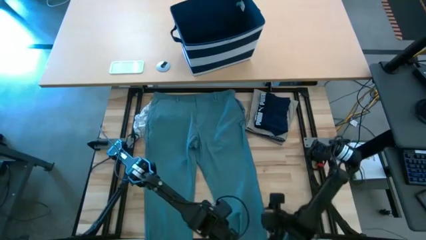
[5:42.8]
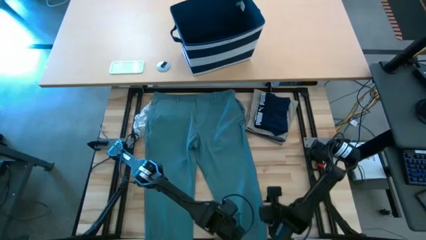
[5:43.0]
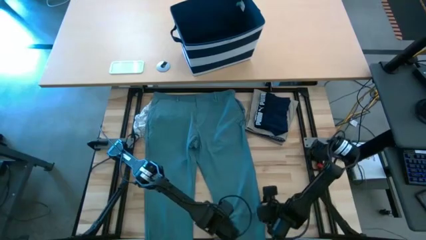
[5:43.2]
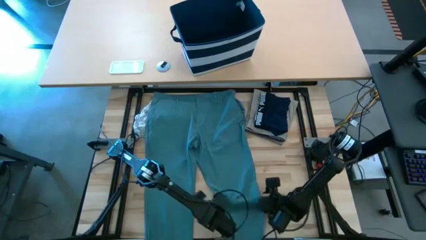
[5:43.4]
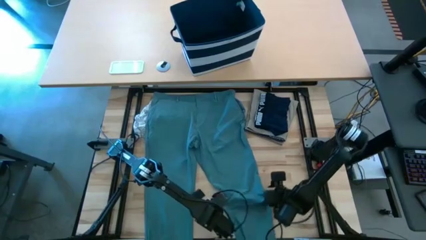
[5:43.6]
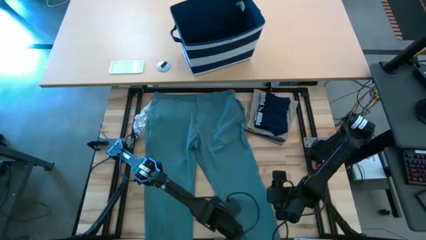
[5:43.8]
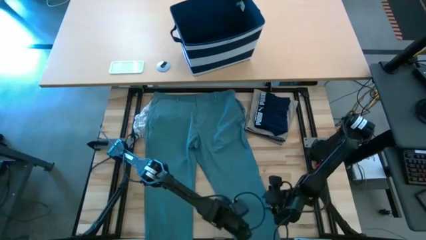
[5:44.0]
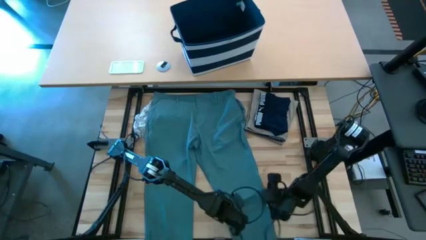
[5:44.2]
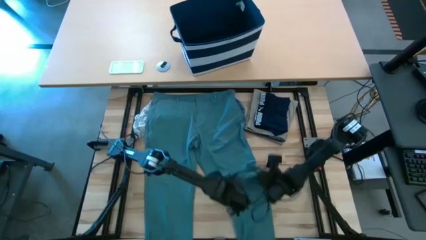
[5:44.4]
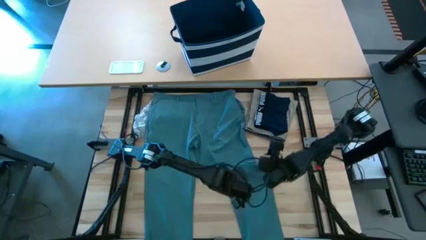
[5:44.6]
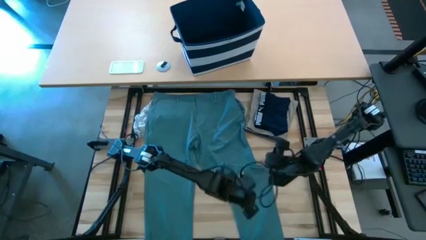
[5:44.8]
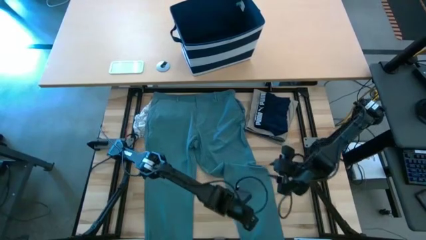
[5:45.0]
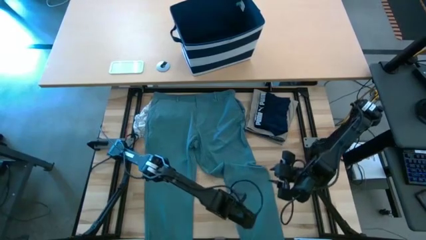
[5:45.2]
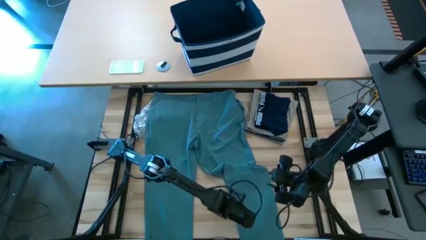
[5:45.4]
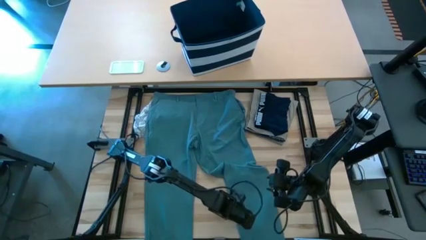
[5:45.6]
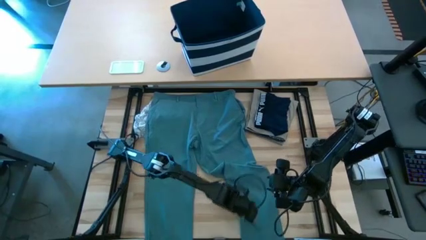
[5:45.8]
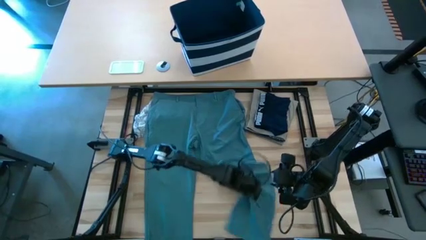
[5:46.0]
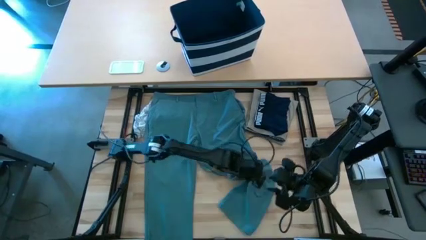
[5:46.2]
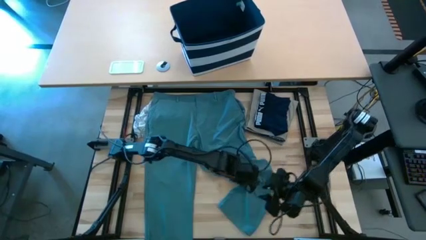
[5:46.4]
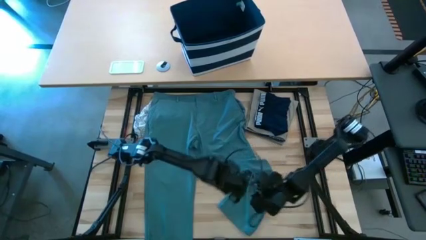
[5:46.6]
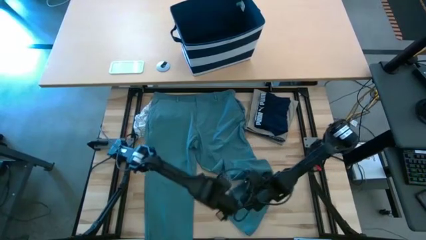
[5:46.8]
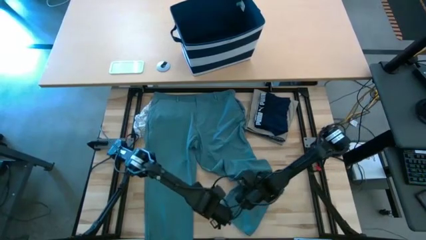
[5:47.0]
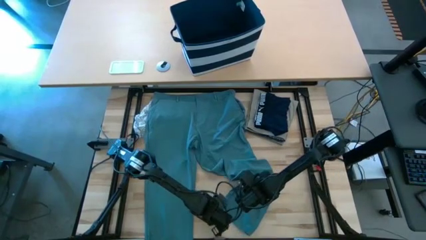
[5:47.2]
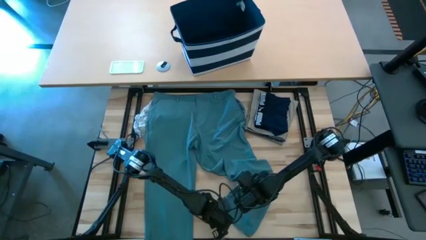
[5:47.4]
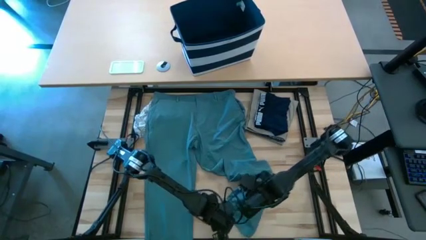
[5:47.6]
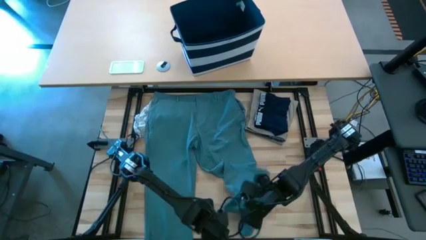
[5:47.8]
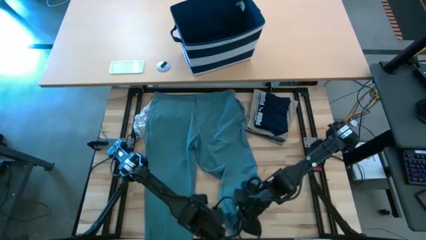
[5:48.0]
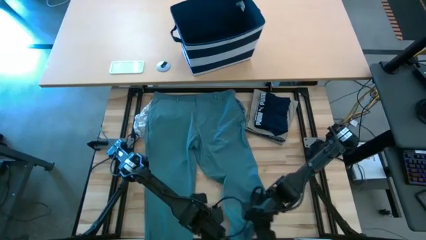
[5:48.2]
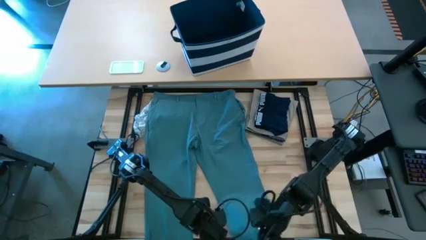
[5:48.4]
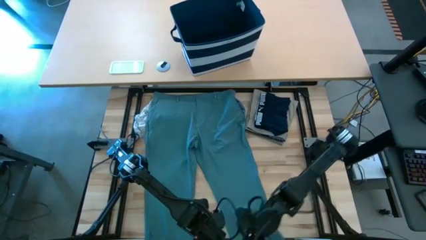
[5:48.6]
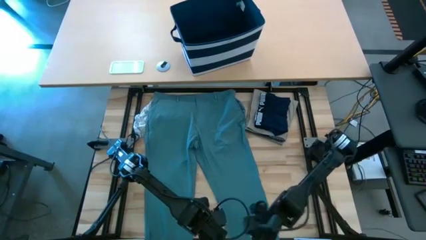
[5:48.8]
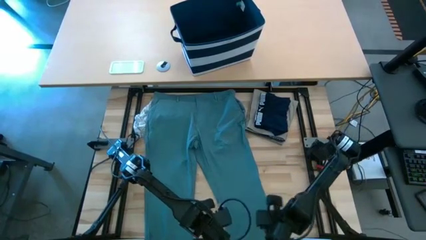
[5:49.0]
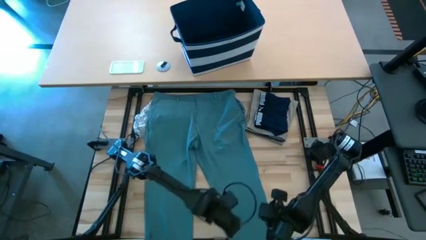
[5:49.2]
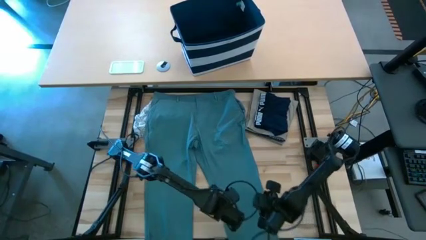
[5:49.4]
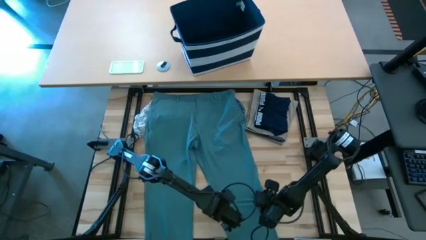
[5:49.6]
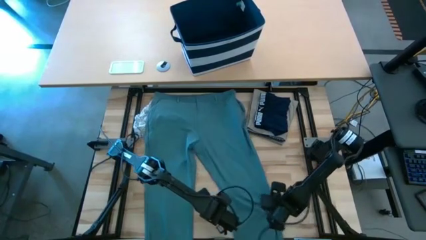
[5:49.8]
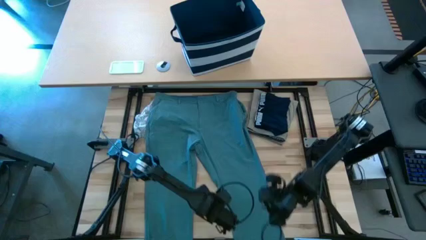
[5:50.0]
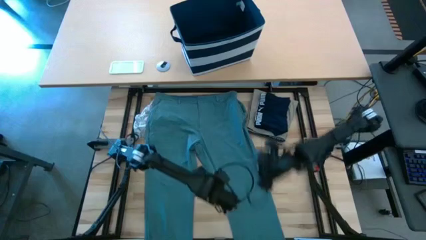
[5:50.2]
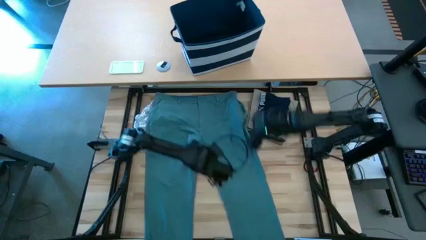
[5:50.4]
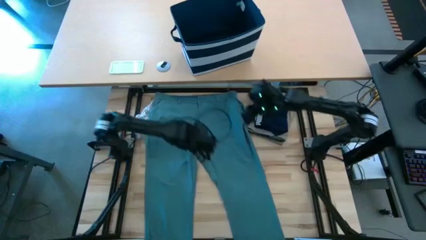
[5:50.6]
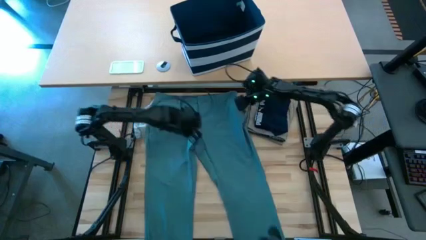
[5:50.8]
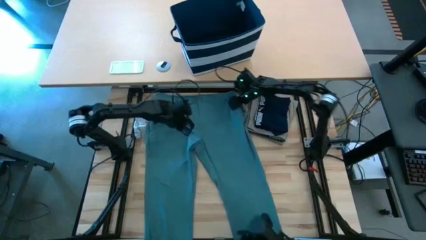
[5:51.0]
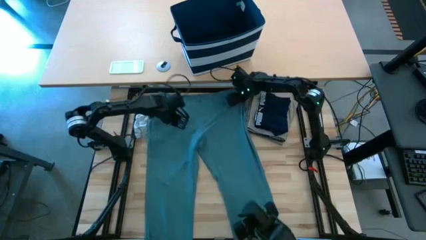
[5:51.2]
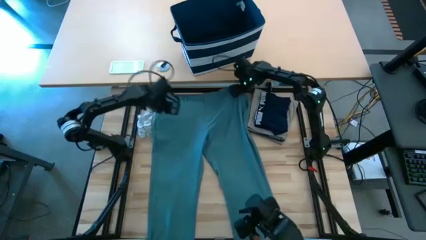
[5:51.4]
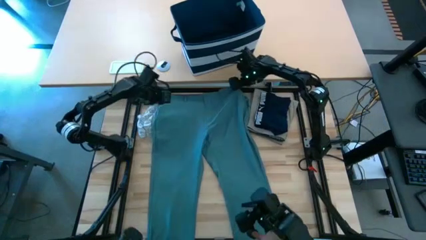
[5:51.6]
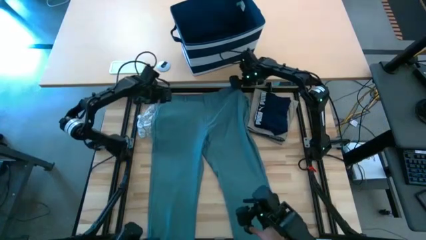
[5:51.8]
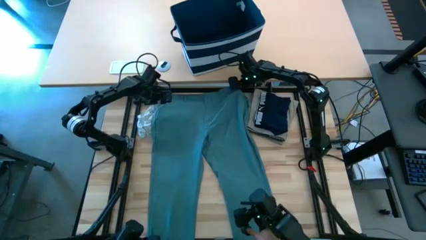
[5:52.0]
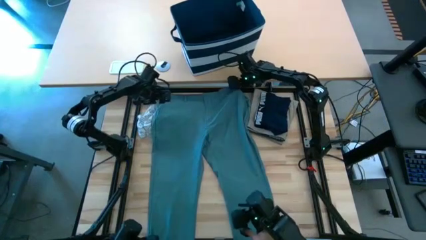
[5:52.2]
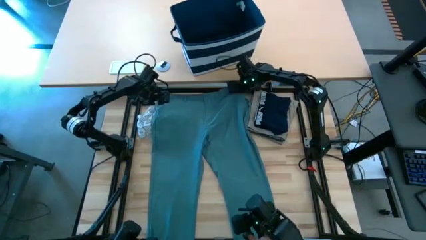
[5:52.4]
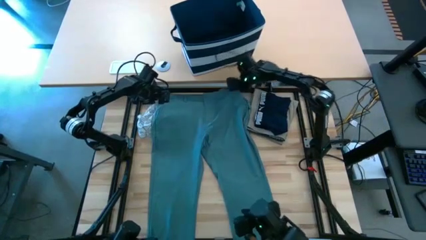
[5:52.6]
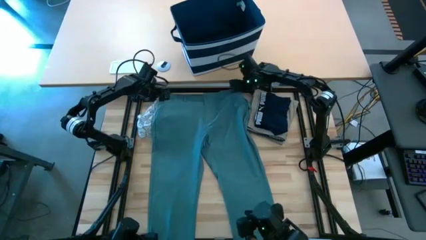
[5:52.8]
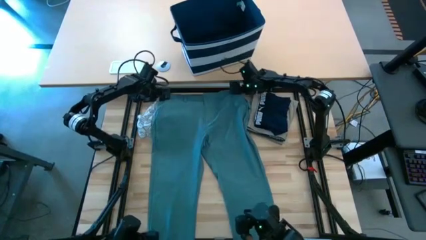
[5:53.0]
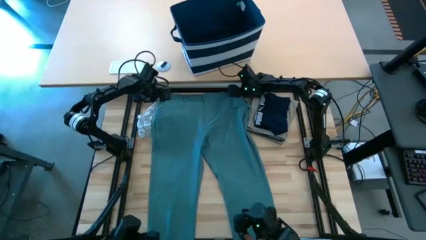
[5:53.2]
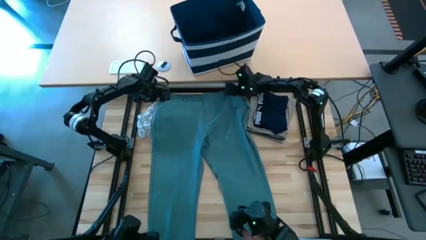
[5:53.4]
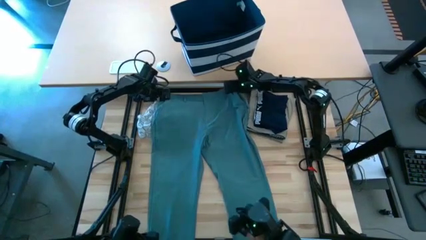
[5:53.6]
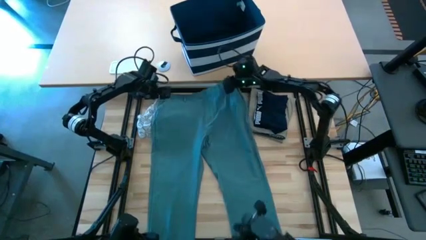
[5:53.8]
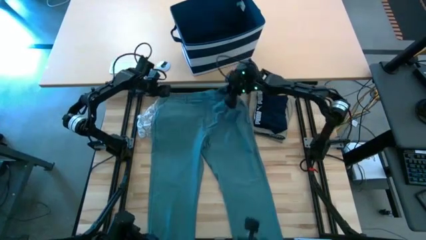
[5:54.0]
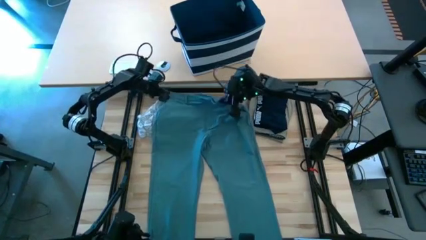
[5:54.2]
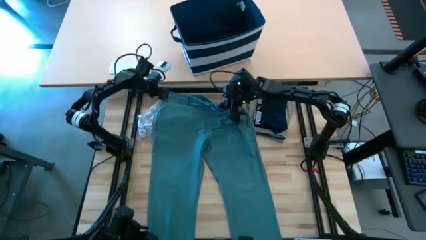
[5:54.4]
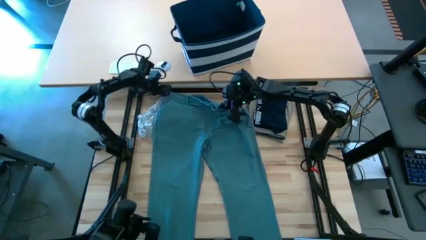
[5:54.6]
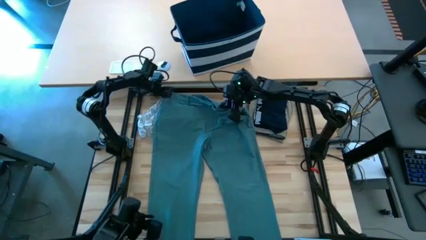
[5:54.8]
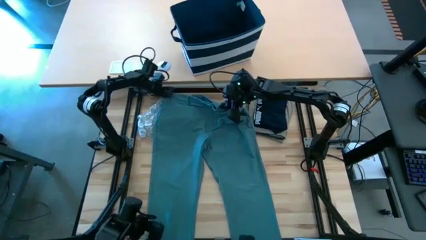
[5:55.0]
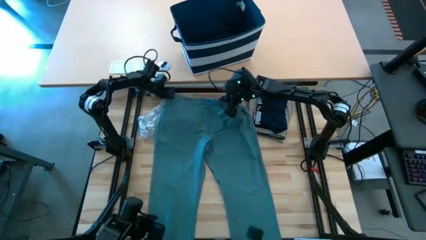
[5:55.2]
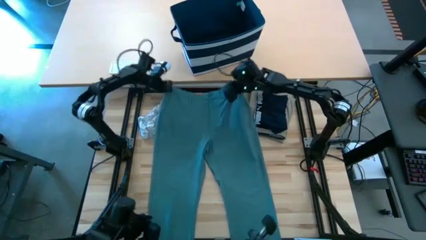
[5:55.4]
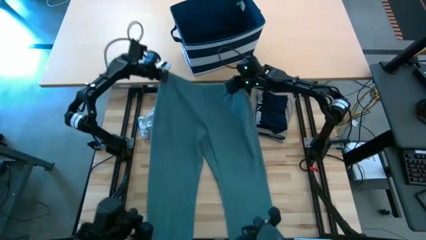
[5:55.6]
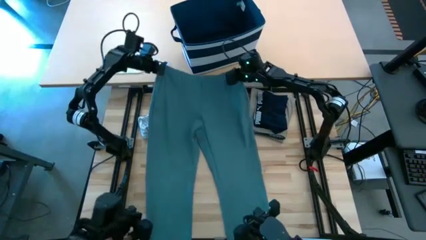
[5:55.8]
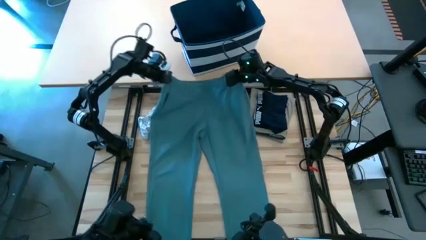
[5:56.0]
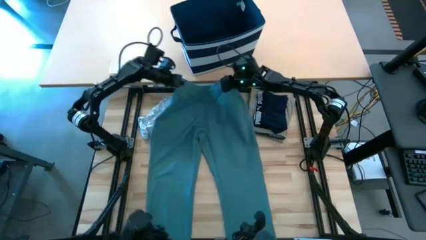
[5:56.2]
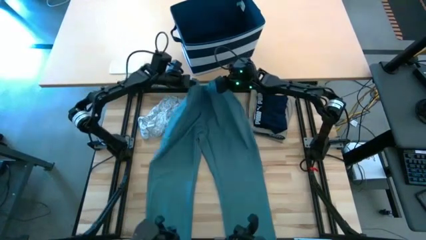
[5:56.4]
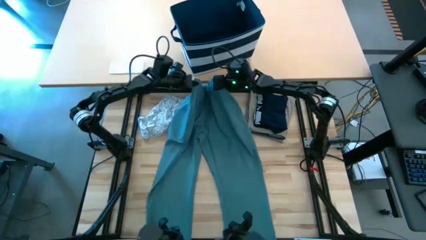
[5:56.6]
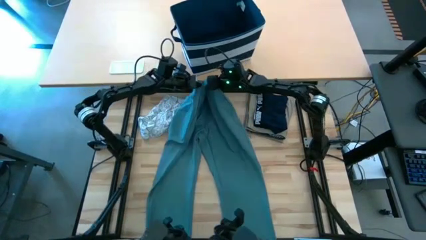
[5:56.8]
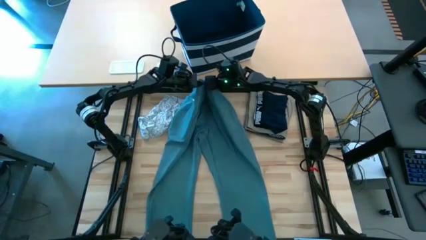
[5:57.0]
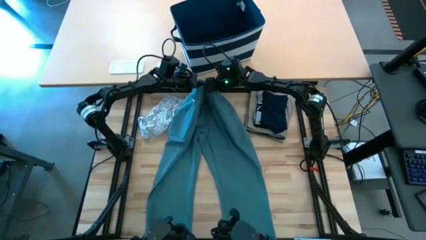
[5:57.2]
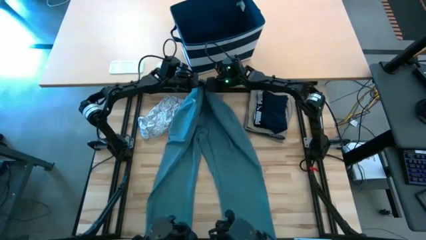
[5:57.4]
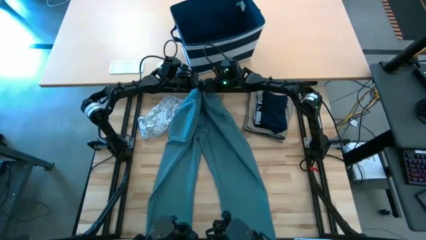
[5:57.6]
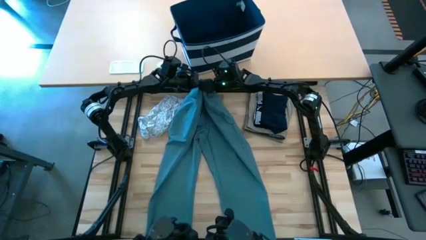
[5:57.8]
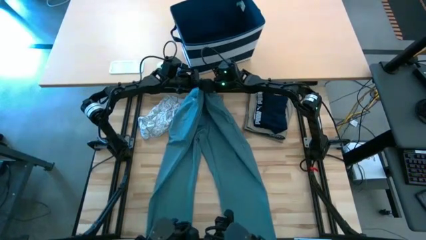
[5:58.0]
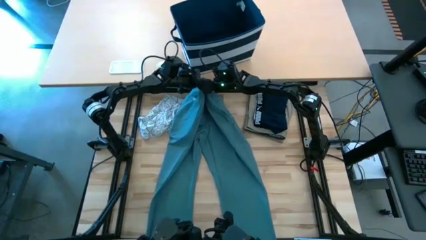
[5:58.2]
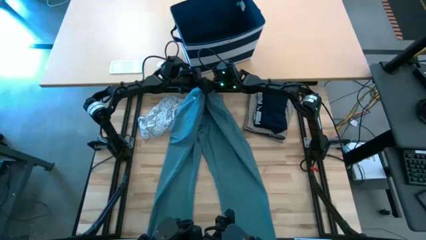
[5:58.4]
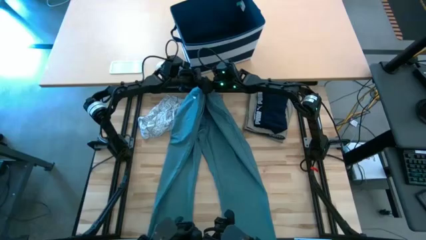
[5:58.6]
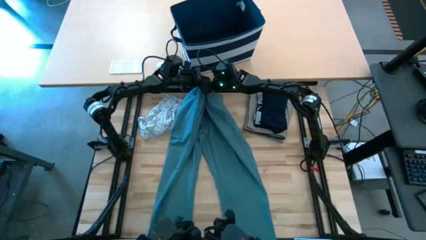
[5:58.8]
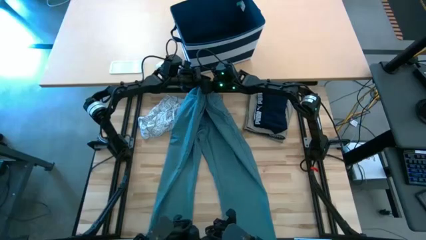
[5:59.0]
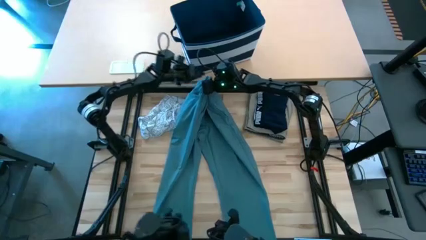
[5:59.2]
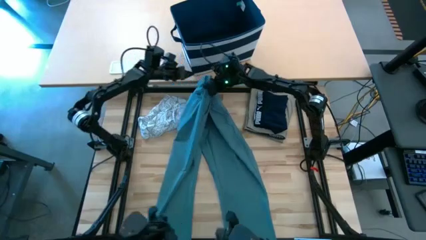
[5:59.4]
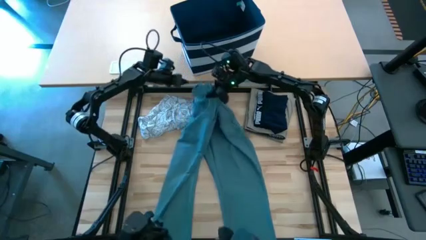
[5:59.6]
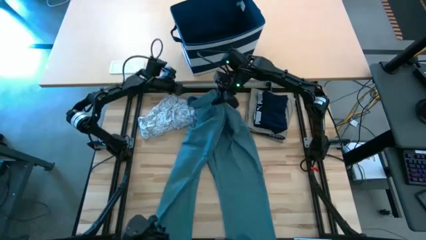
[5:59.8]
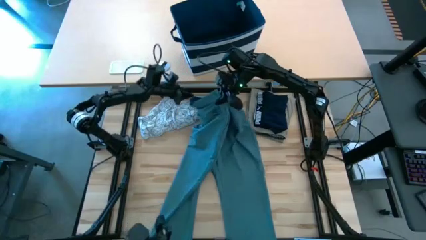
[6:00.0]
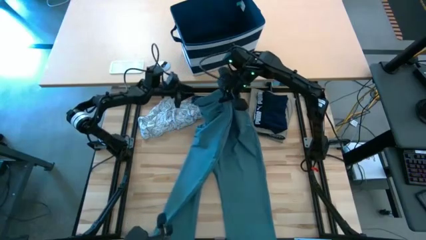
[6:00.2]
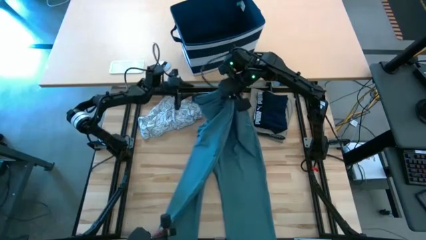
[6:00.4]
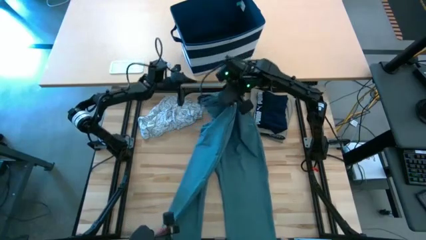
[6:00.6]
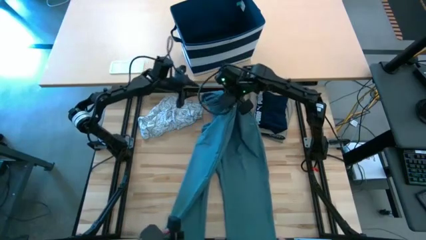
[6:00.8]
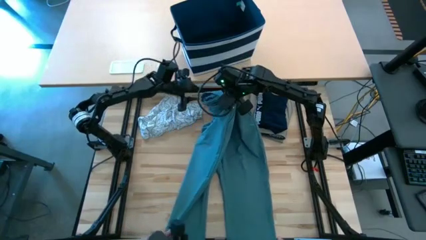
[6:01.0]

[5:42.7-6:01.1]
Task: Fold Laundry from Bin
Fold the blue pants
